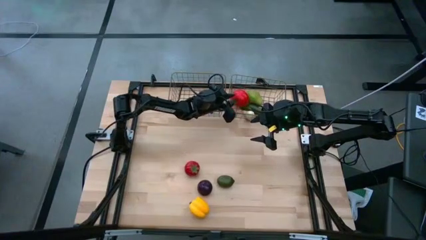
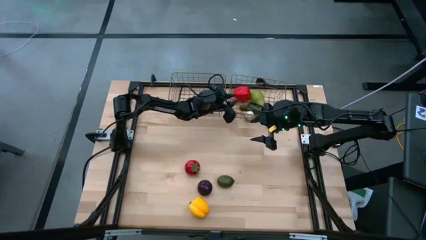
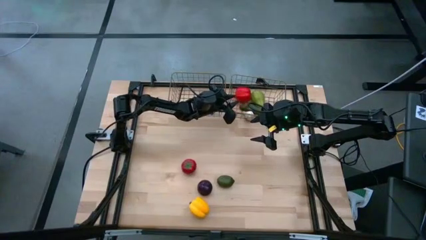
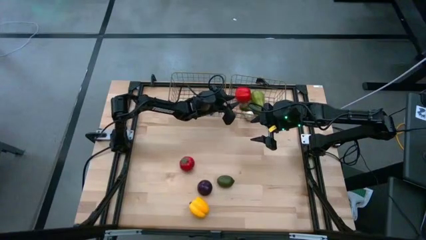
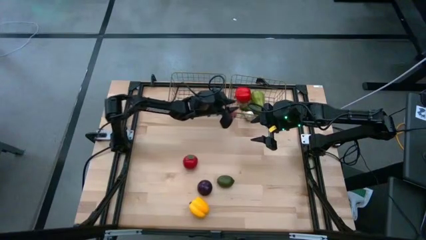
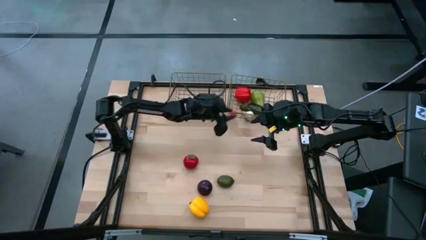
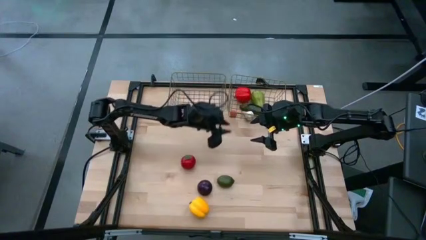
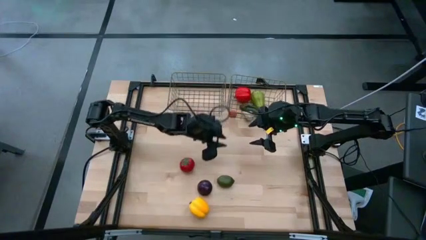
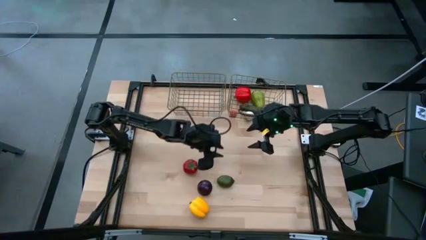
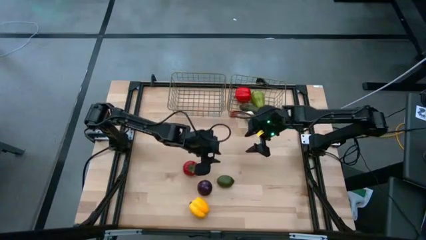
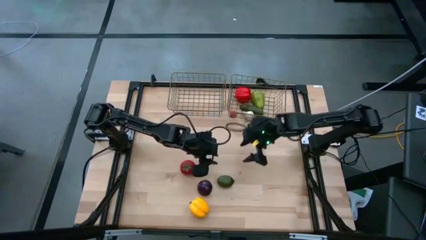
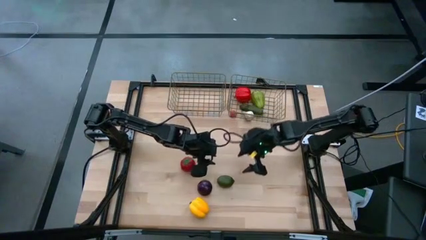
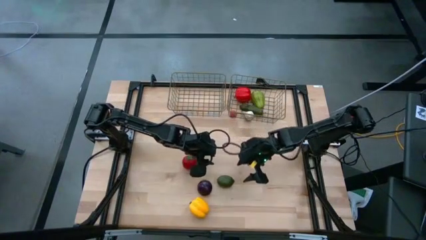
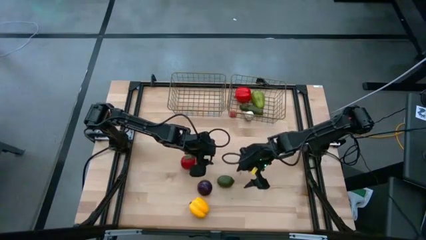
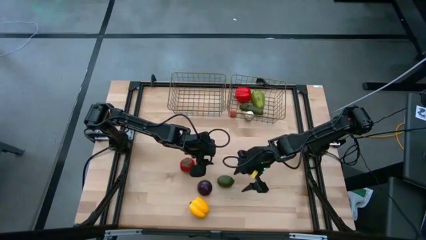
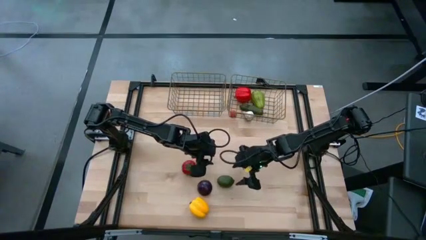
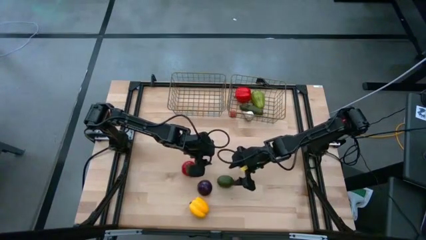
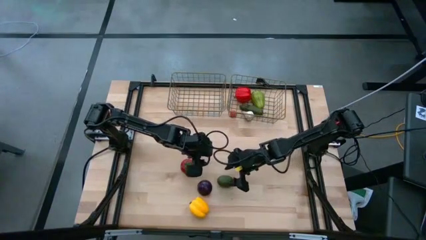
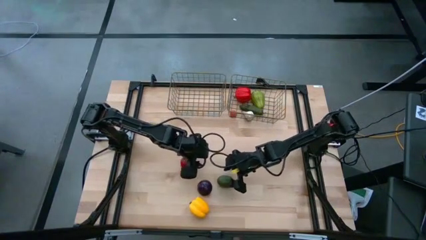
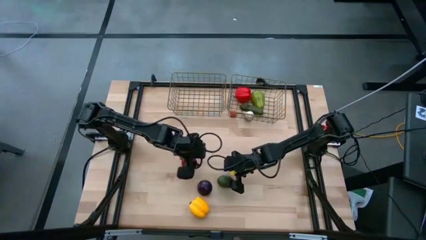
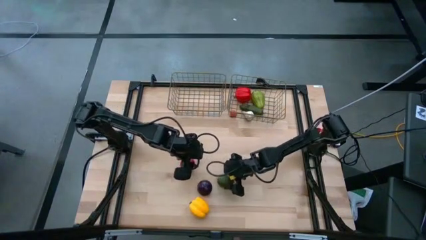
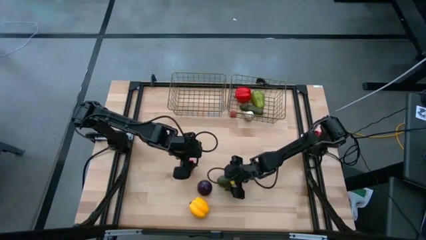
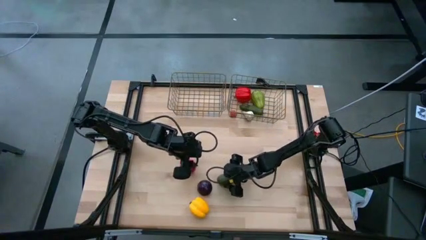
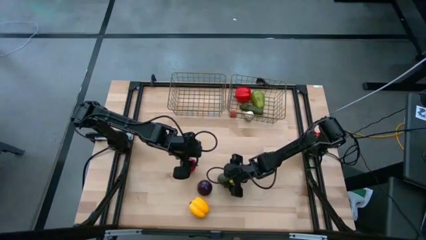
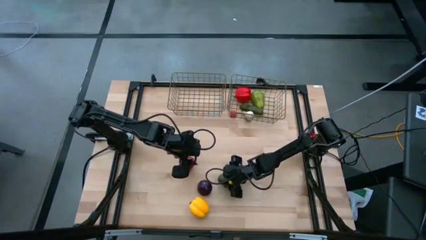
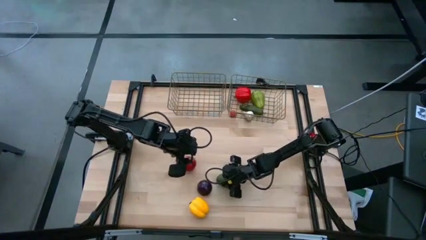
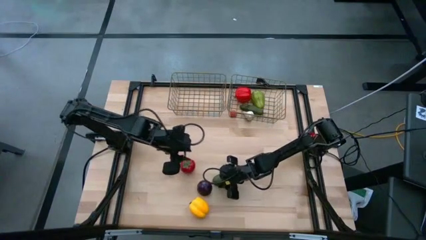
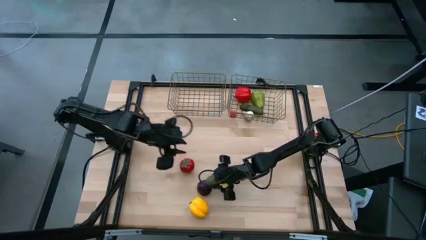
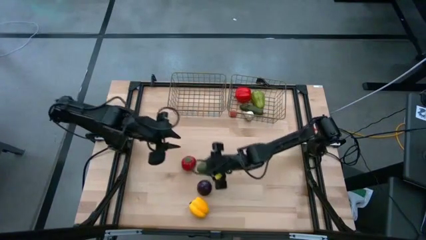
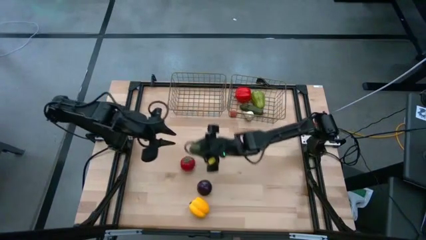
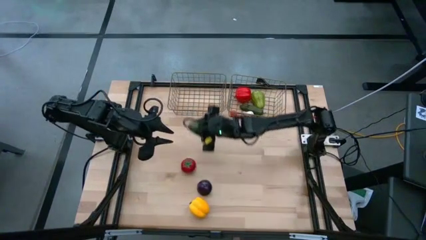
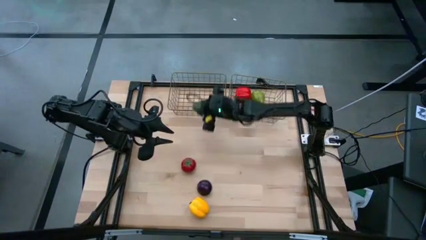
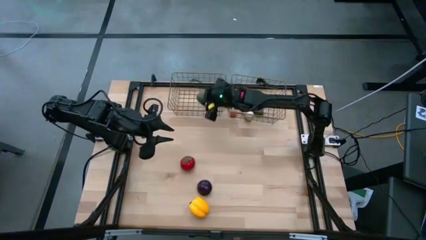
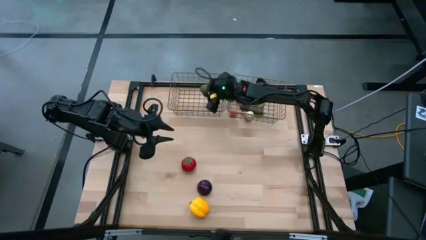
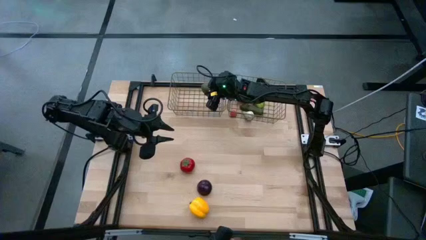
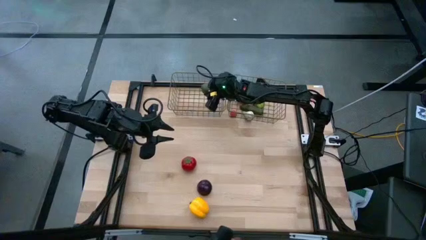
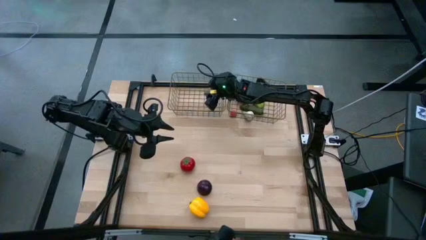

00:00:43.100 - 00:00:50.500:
Task: Sort produce into baskets
Put the green lime into the left gold wire basket

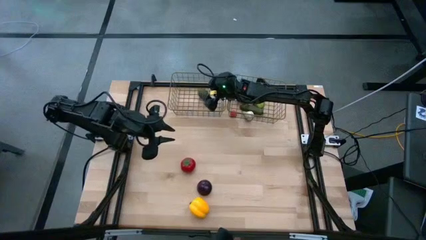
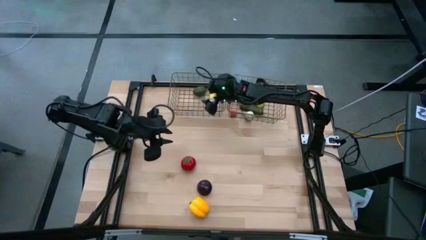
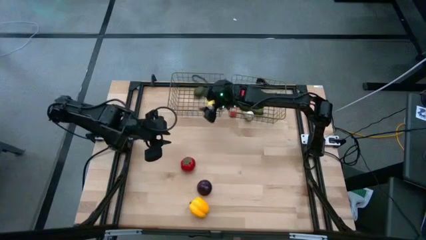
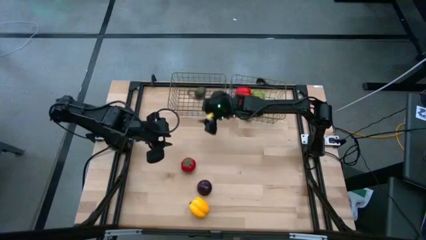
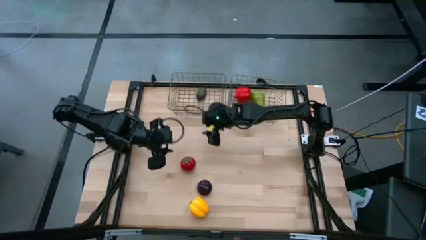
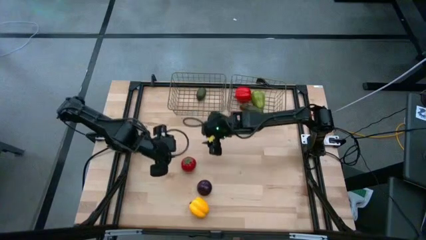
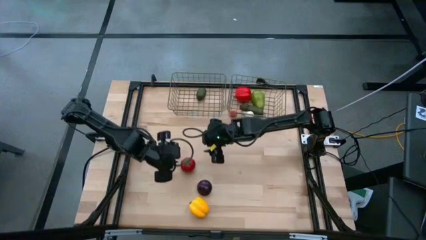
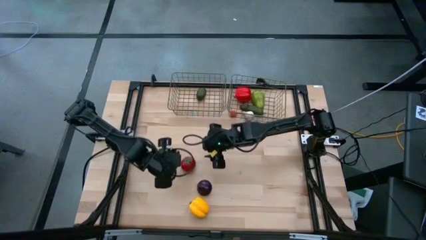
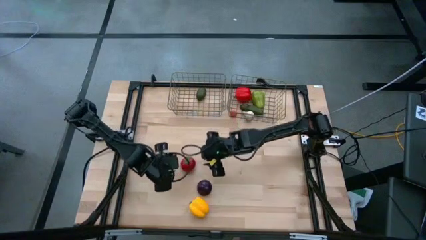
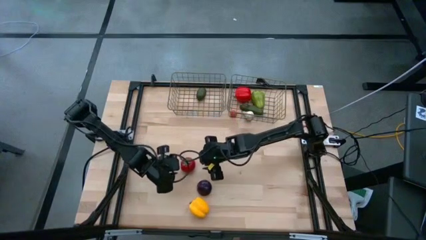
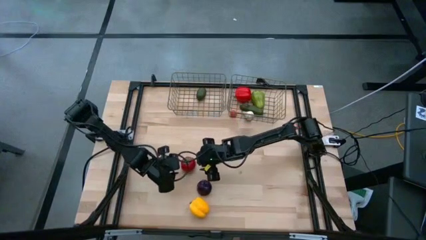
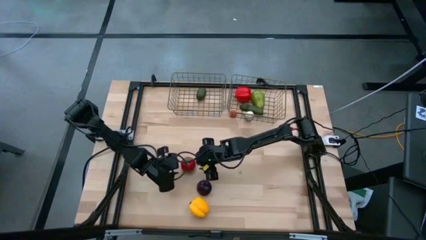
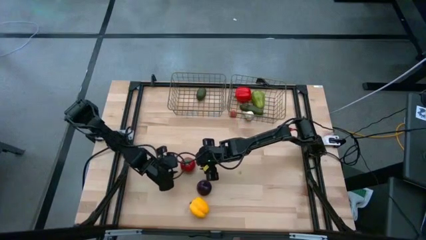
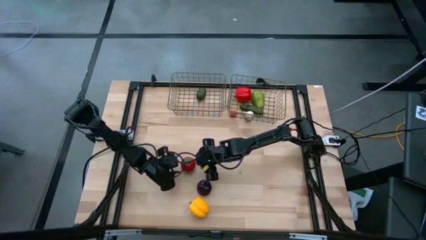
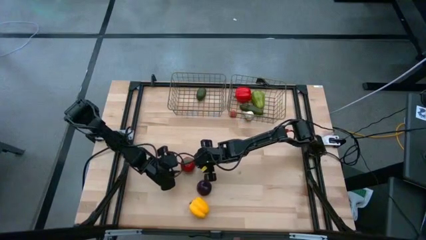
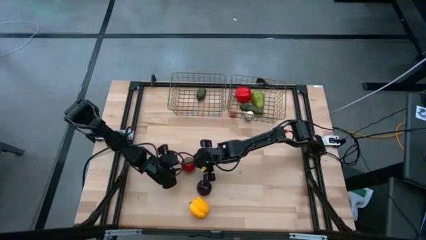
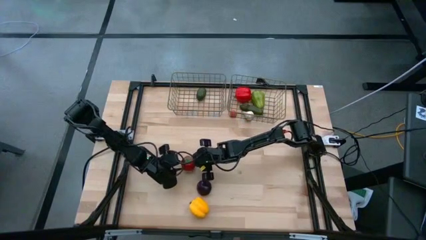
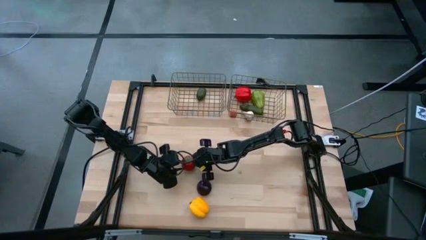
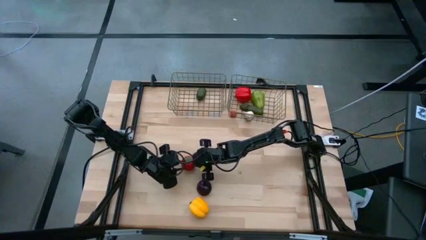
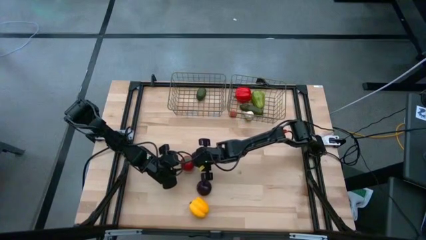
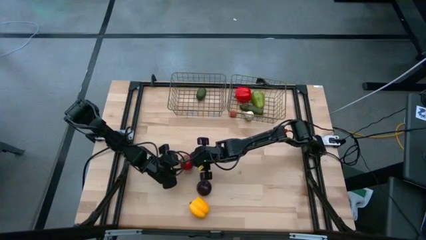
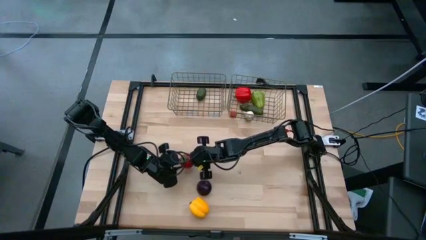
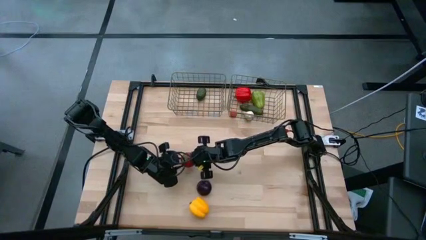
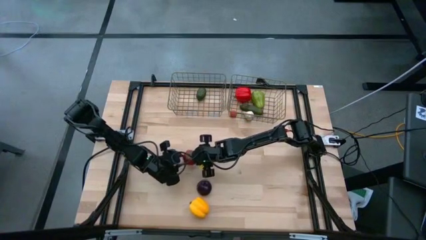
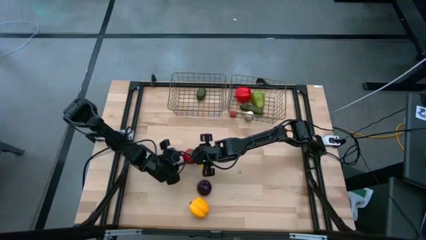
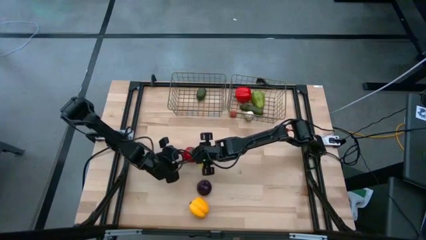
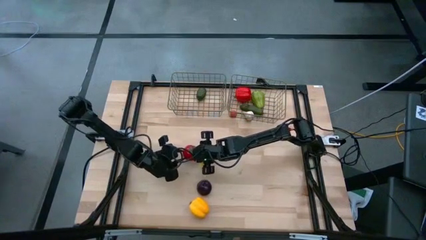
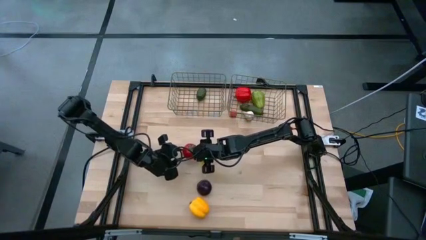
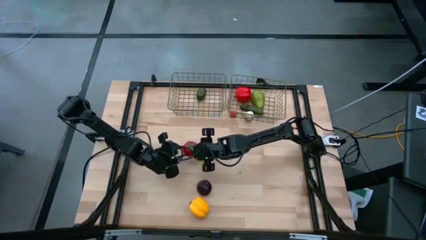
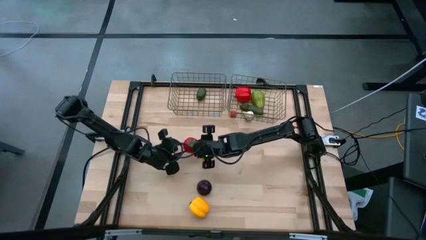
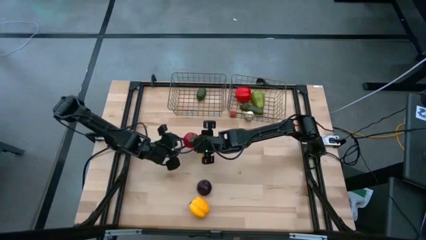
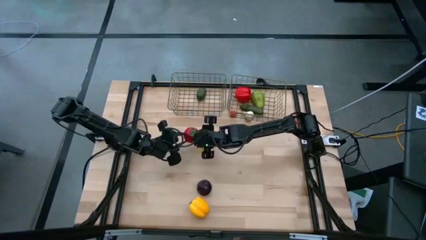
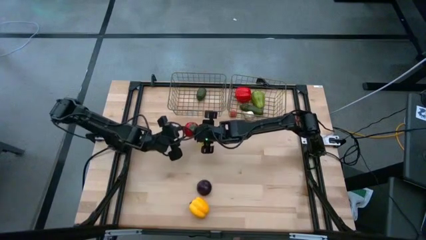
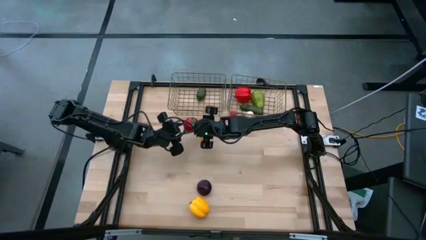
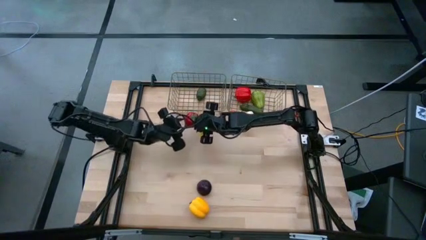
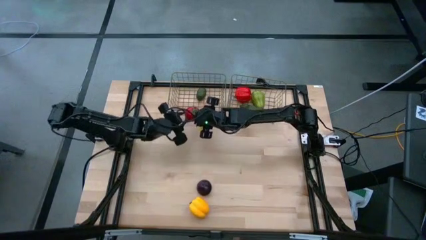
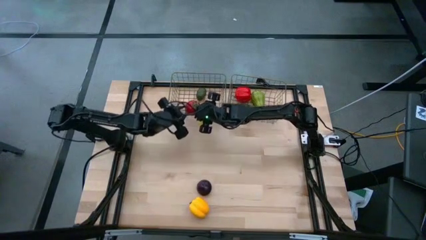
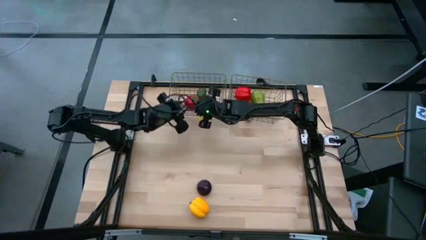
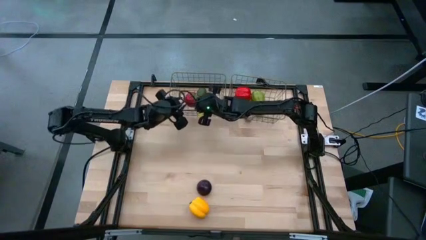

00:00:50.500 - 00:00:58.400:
Put the red tomato into the left gold wire basket
